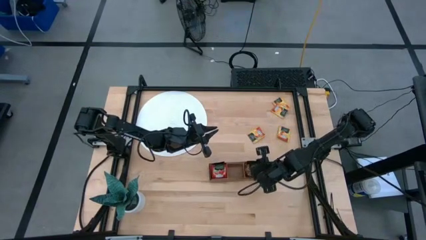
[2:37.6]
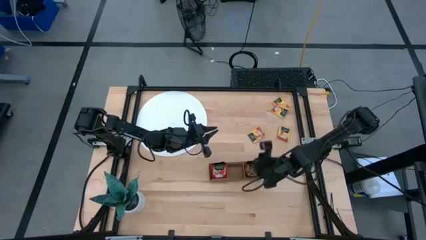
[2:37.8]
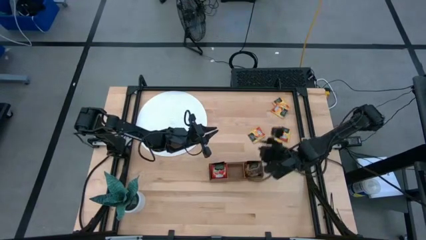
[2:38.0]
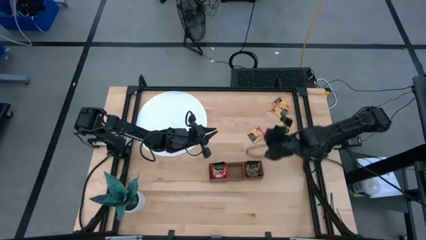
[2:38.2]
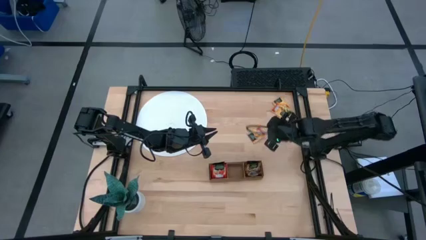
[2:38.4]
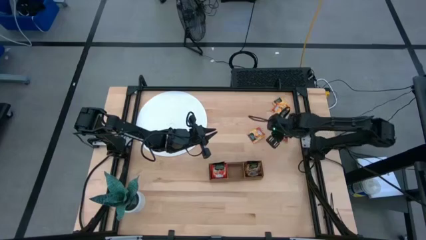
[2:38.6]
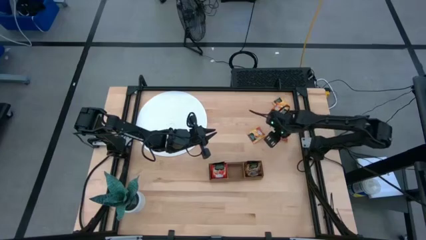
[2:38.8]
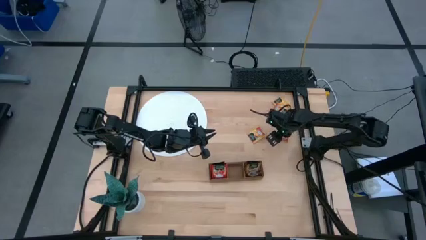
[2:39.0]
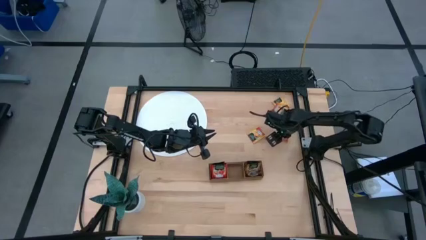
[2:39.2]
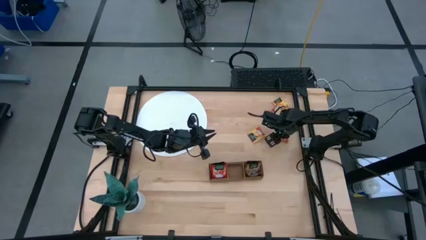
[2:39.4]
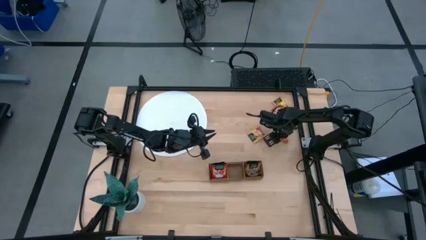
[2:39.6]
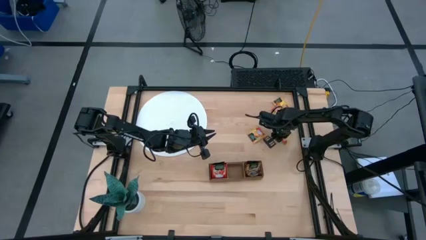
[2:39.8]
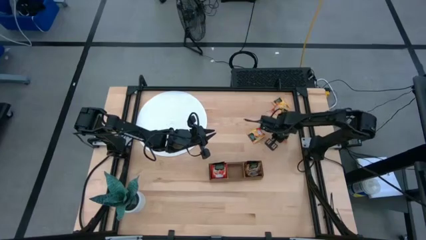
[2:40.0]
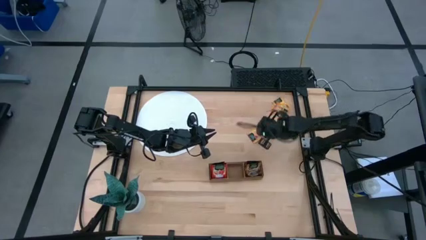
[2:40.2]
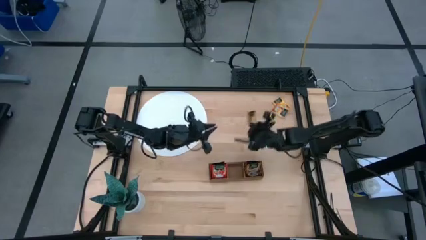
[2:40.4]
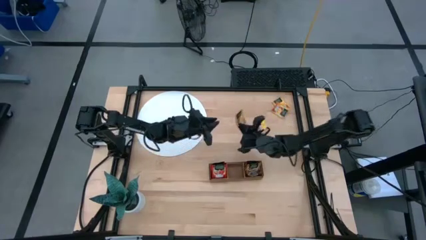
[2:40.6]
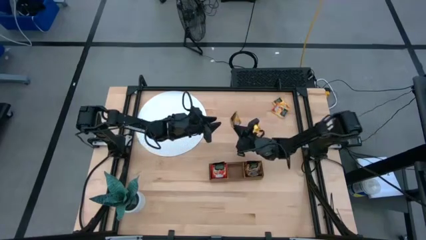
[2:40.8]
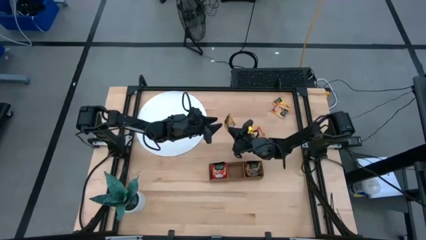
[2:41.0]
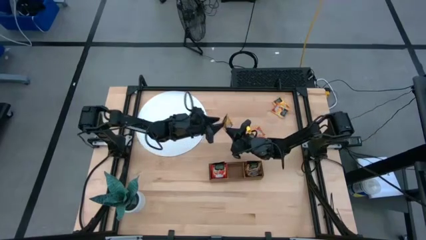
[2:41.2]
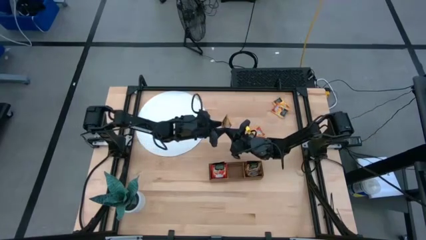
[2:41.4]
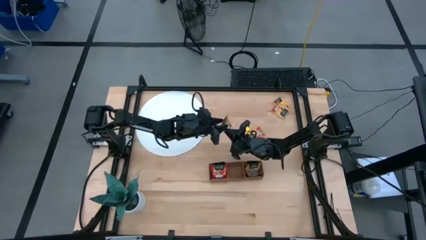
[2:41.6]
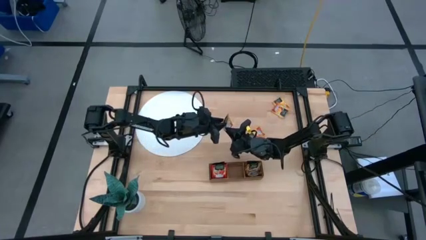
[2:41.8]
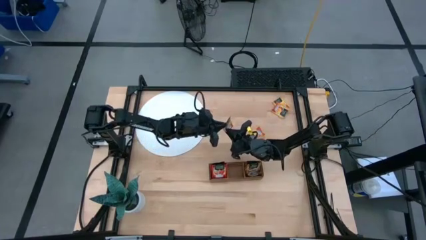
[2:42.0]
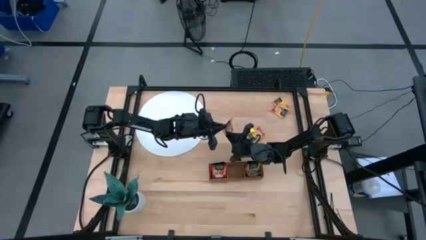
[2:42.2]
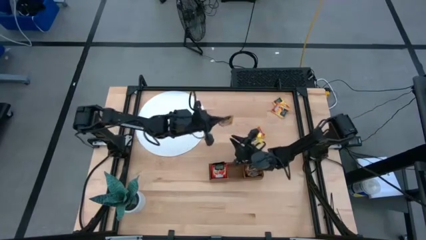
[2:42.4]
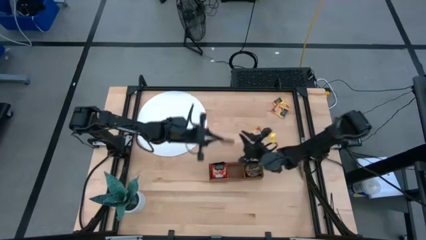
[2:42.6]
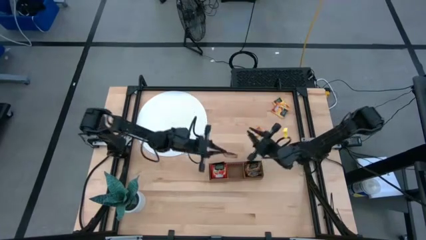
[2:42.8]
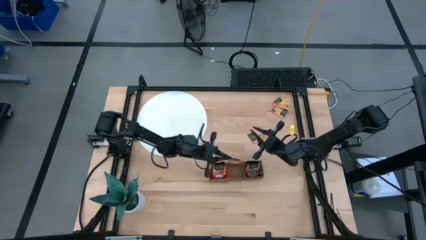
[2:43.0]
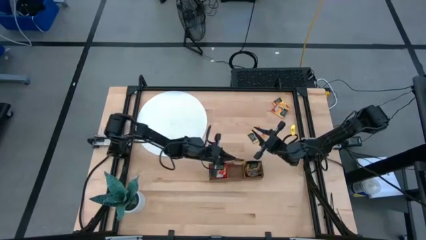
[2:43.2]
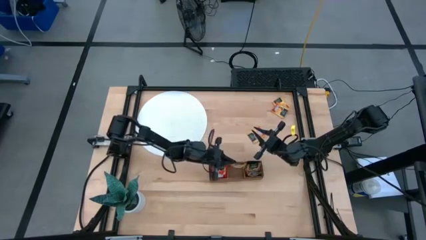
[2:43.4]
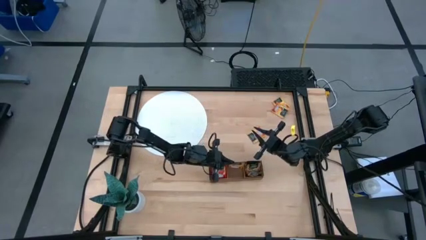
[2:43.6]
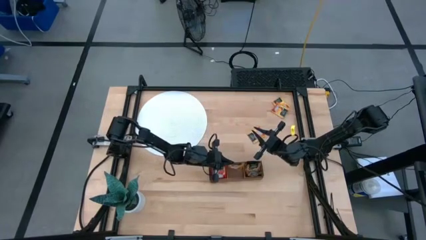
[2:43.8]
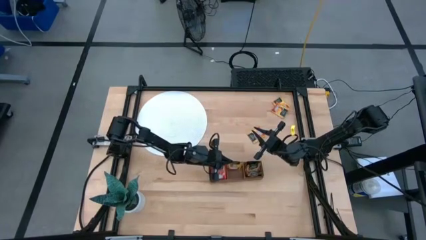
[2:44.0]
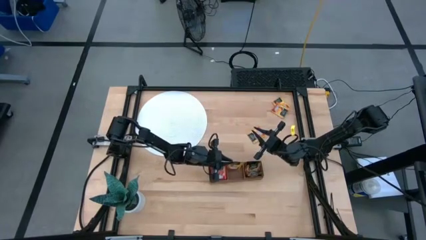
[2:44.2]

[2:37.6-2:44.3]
Task: Pick & Place Tea
Put the orange tea bag into the middle section of the wooden organizer

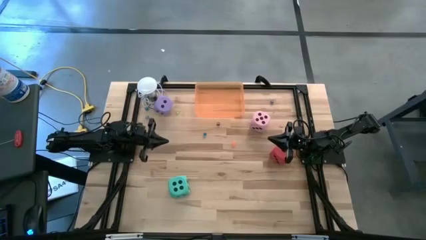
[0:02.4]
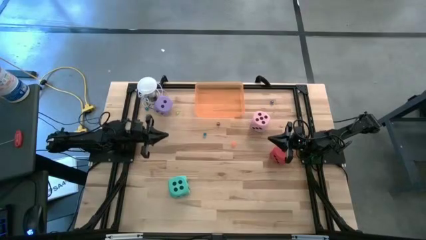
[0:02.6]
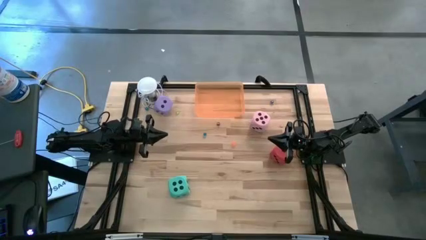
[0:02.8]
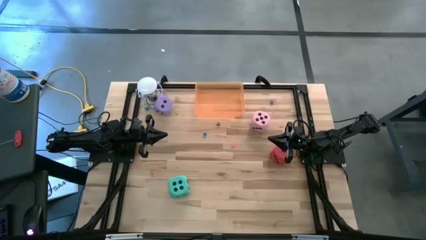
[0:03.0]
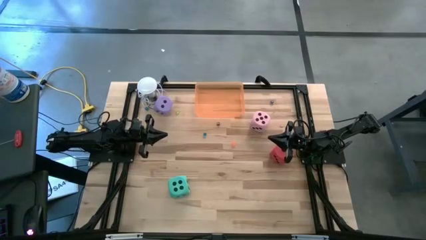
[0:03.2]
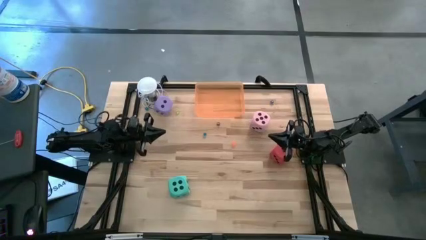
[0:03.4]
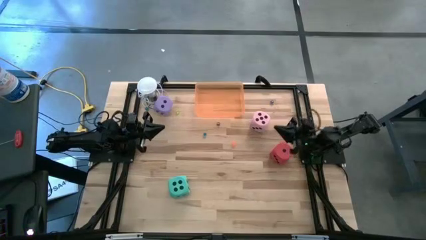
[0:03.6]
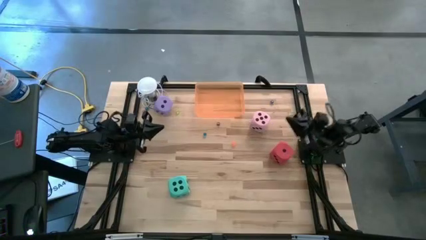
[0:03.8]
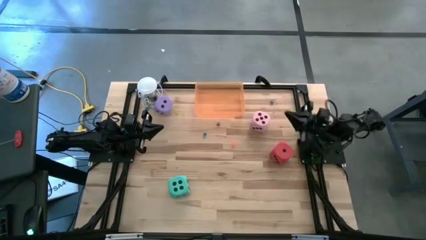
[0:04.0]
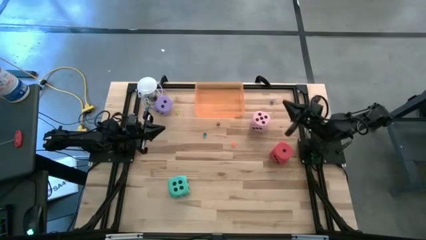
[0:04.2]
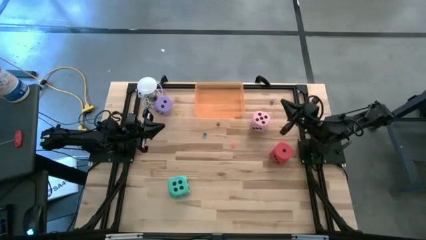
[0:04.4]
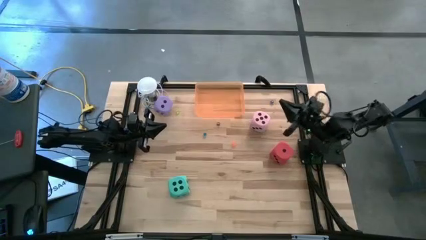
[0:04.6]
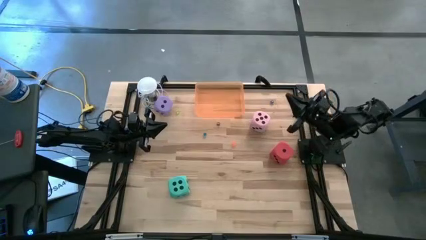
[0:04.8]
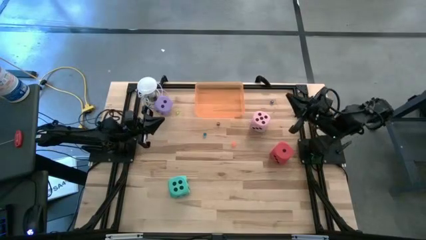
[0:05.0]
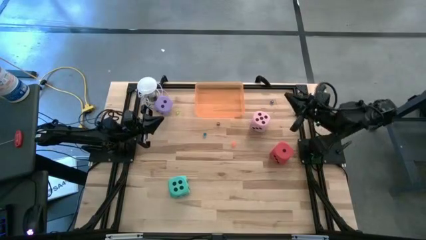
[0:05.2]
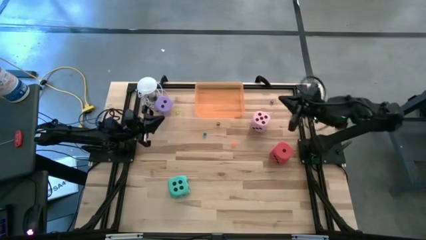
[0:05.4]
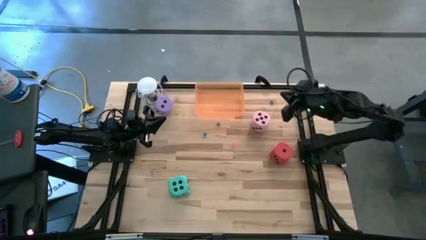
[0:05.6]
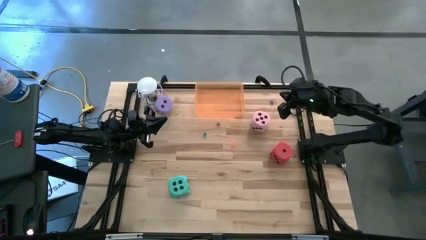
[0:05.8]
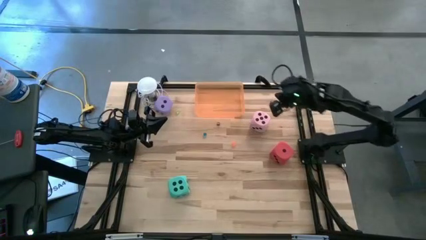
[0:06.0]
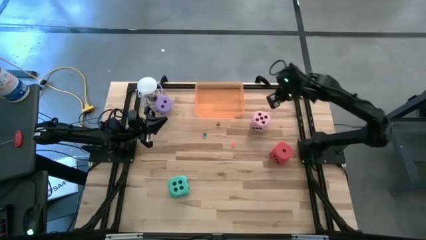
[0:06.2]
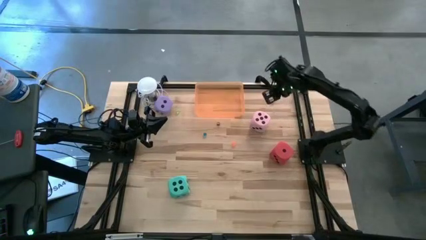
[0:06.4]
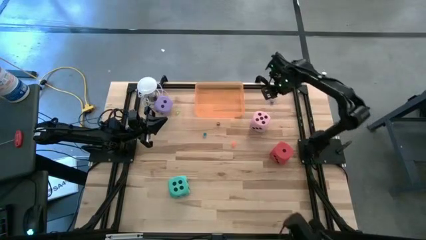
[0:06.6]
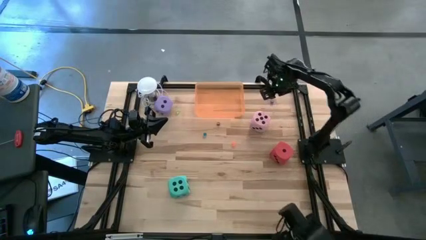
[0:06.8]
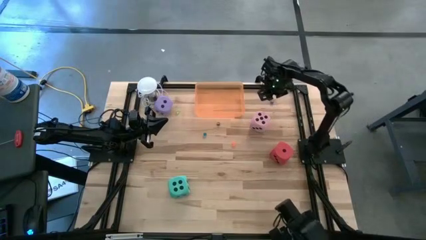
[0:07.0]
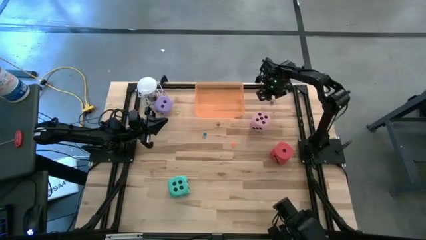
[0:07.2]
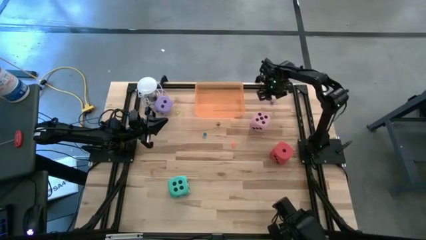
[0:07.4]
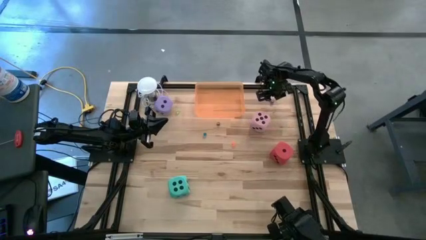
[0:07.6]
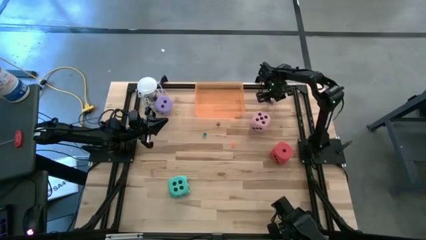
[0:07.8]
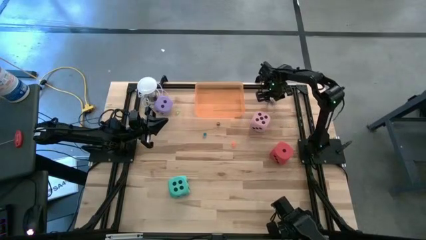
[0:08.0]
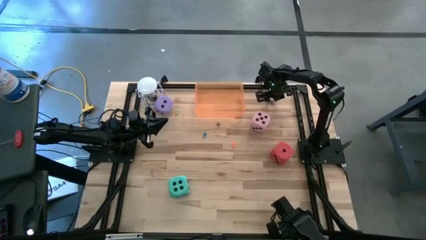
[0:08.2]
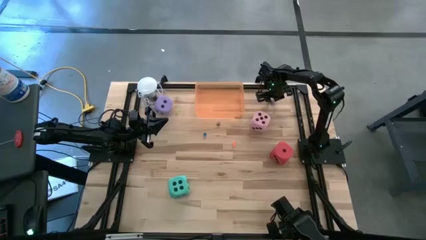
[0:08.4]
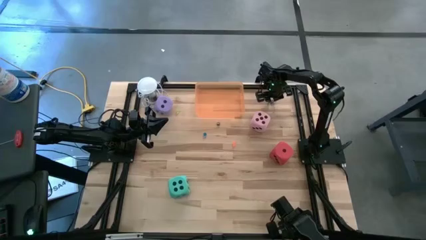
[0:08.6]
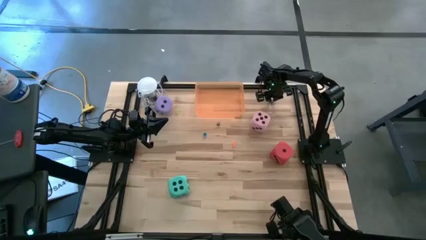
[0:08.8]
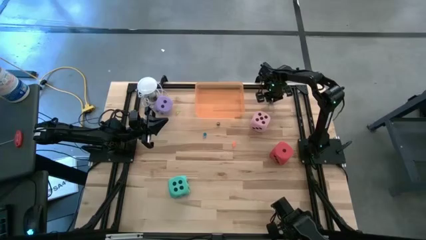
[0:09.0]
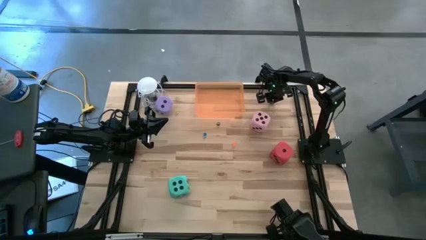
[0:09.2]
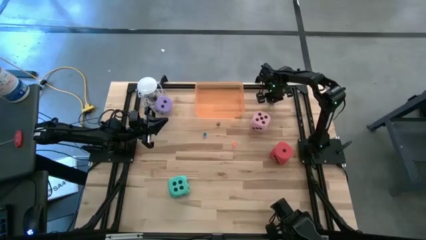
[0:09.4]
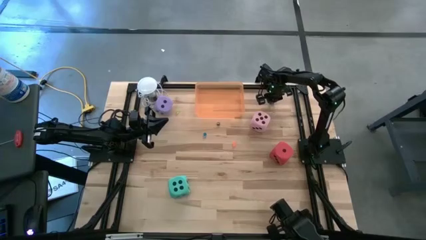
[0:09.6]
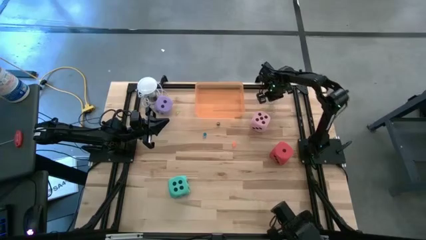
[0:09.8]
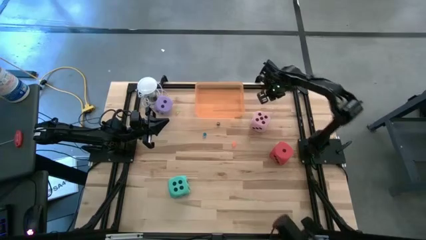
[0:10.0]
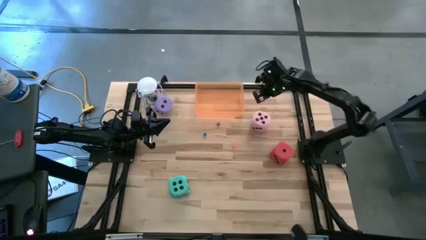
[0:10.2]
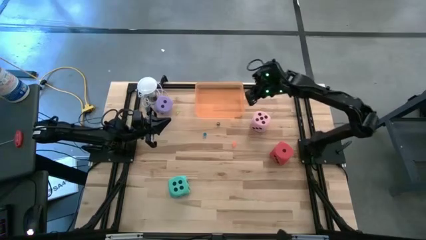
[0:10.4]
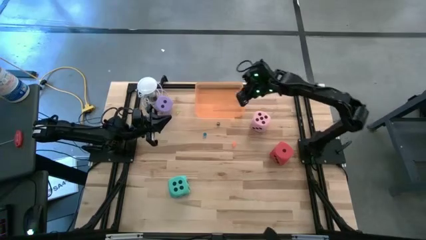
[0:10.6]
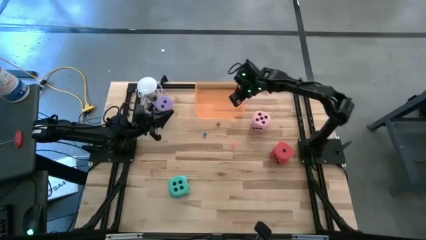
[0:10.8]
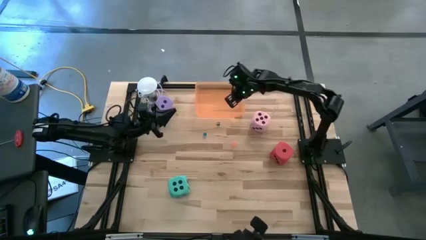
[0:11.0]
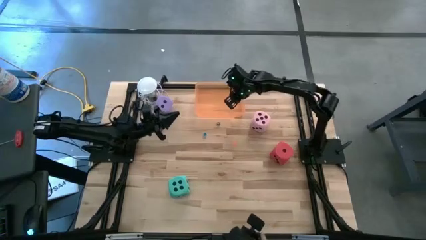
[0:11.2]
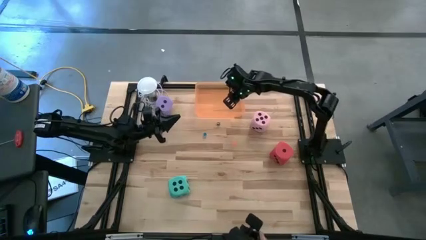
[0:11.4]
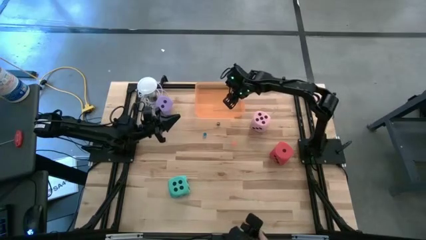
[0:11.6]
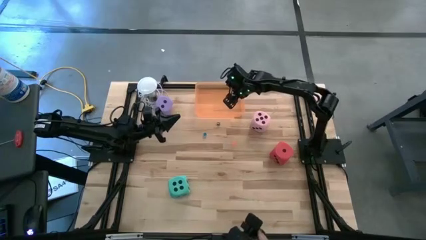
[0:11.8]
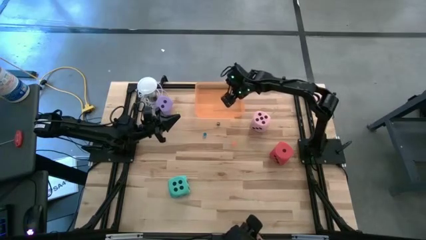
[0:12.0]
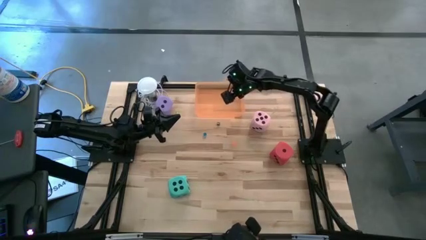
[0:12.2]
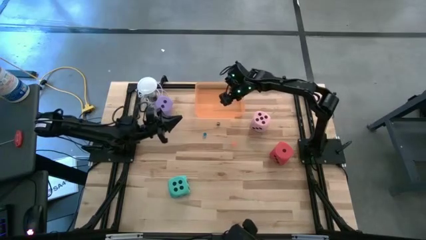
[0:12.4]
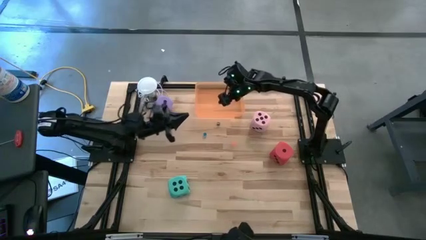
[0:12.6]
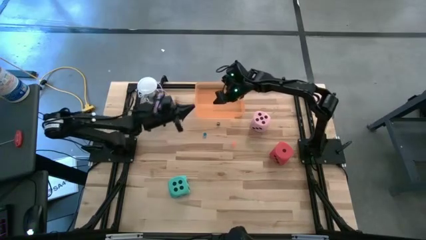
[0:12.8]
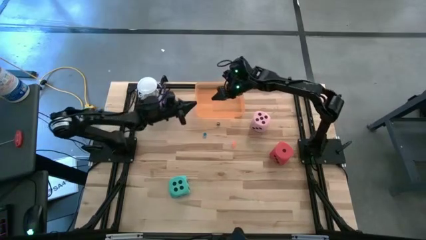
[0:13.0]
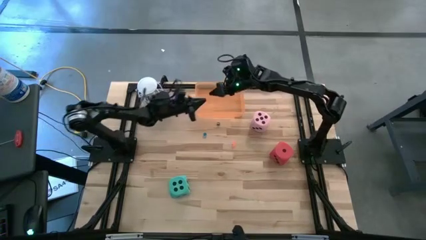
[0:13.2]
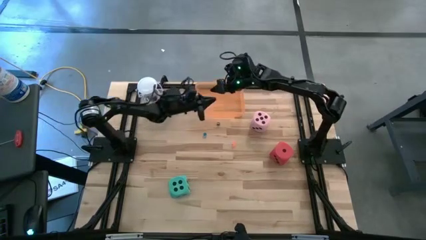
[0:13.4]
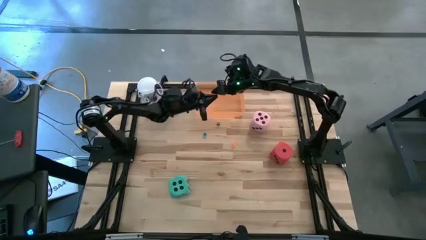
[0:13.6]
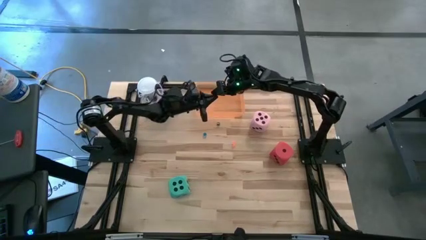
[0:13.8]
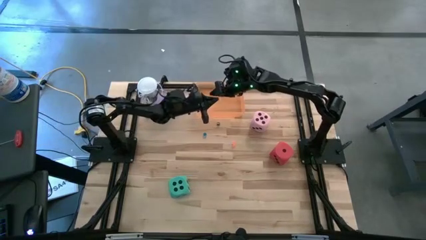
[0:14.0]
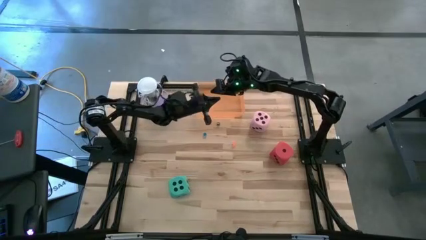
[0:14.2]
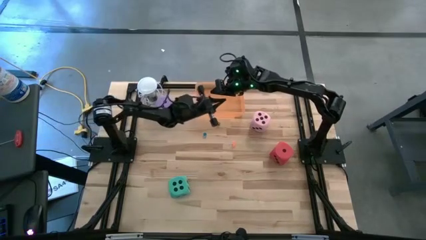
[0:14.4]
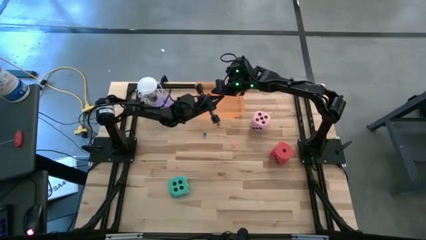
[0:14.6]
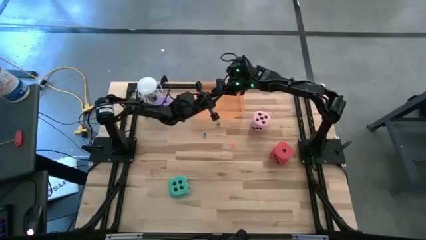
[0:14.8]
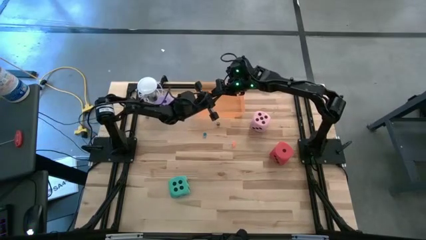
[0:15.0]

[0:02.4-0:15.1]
Task: Pick & Place Dice
Put the small dark blue dice into the orange bin
